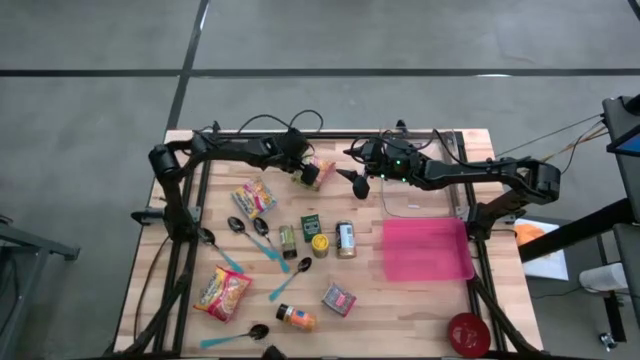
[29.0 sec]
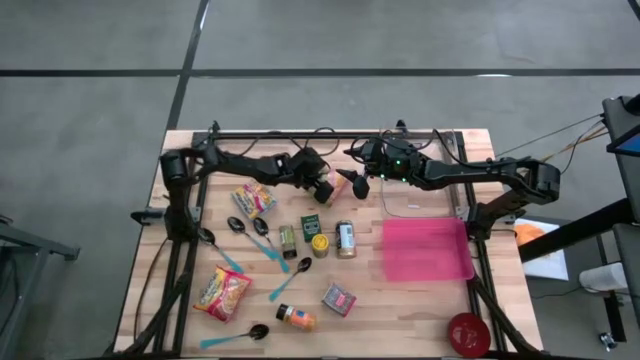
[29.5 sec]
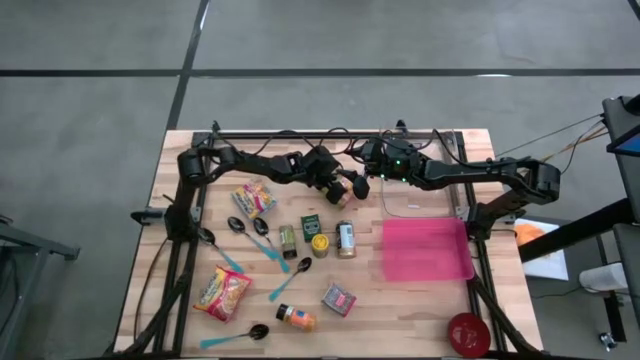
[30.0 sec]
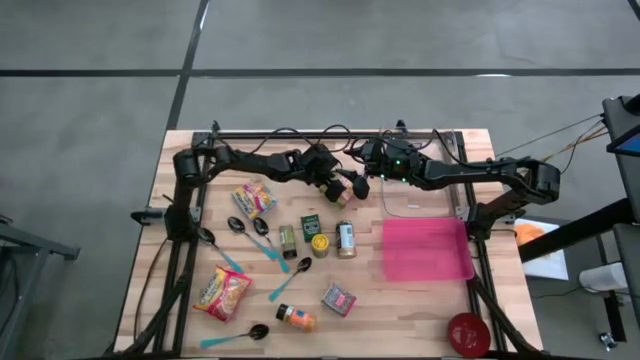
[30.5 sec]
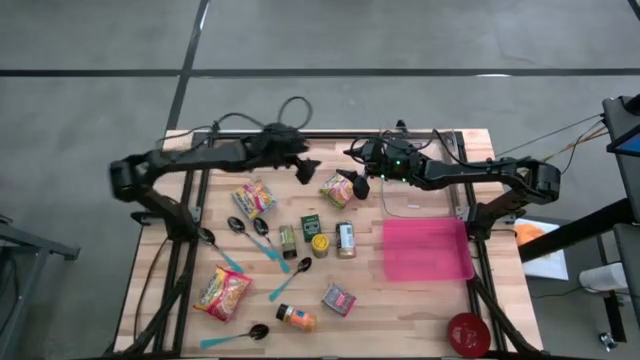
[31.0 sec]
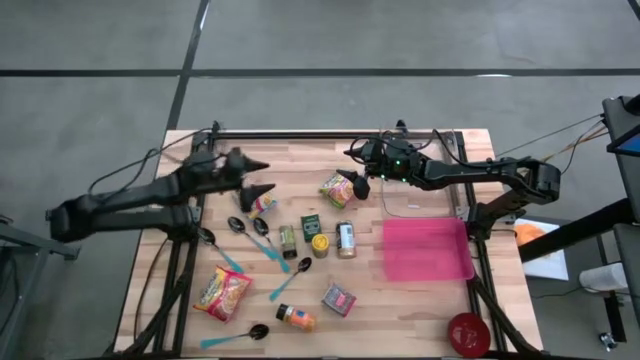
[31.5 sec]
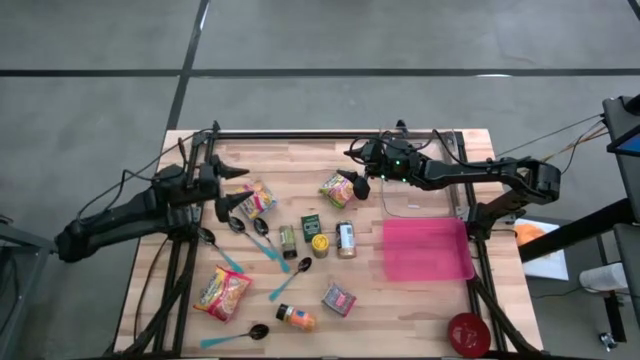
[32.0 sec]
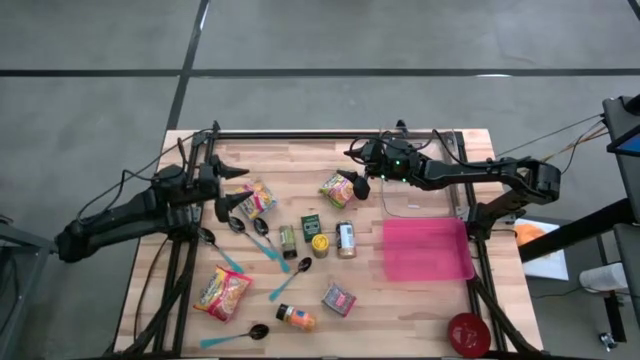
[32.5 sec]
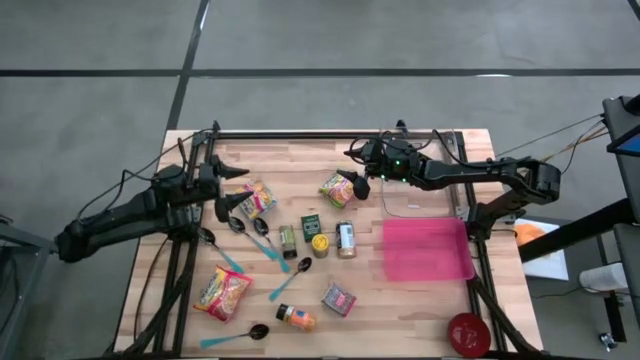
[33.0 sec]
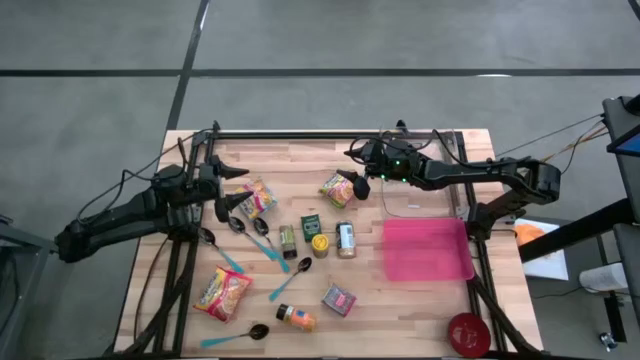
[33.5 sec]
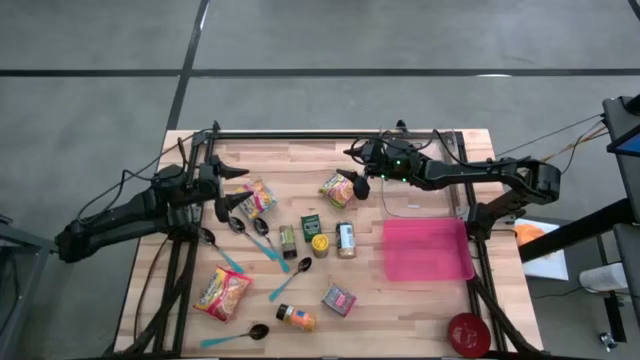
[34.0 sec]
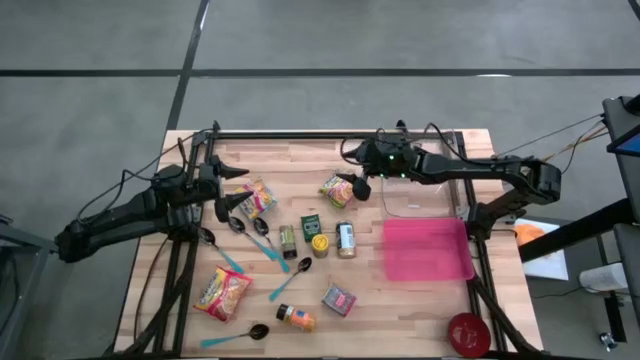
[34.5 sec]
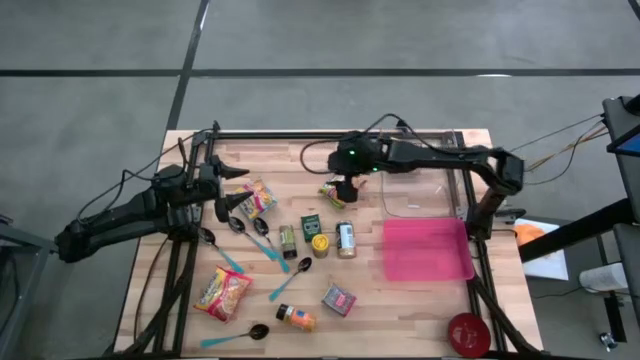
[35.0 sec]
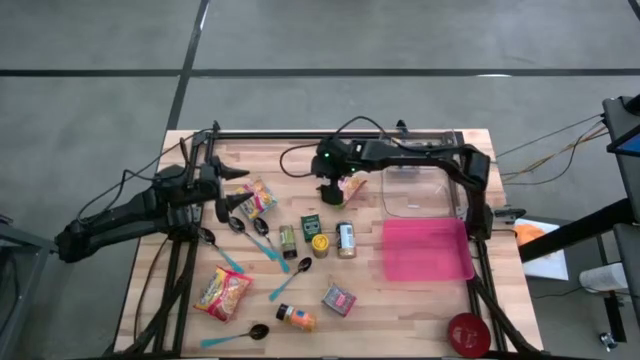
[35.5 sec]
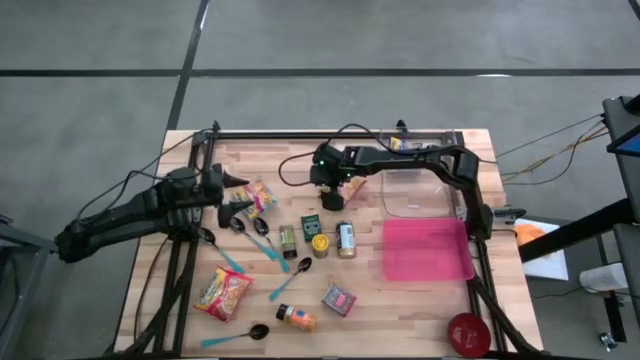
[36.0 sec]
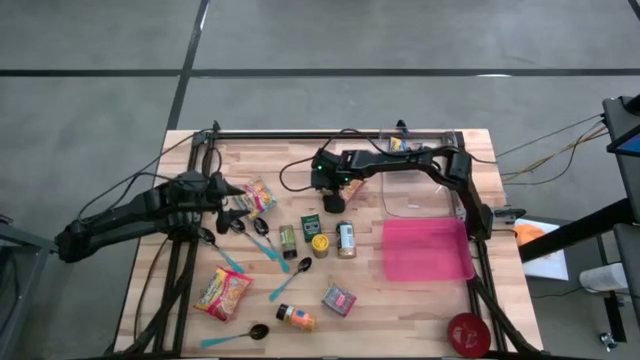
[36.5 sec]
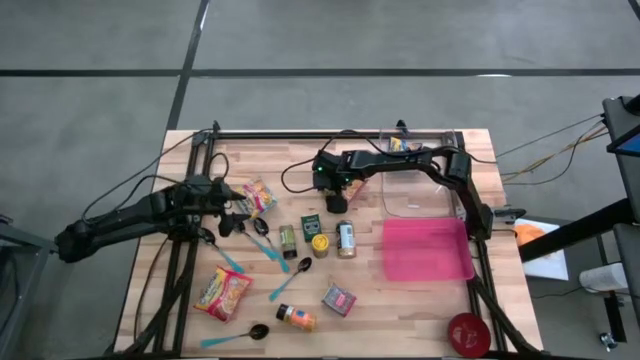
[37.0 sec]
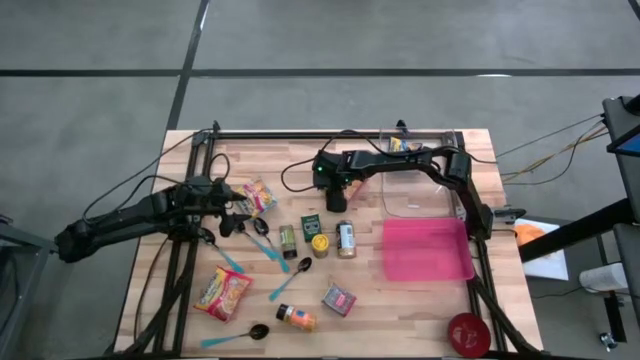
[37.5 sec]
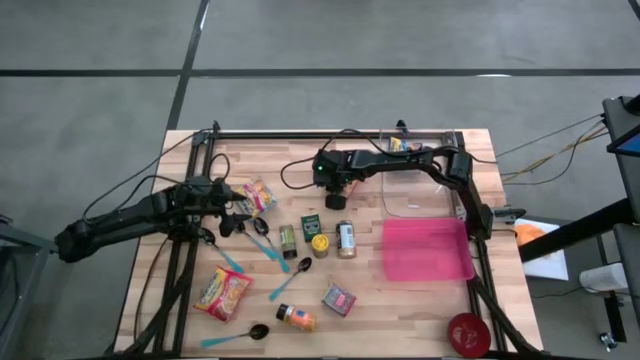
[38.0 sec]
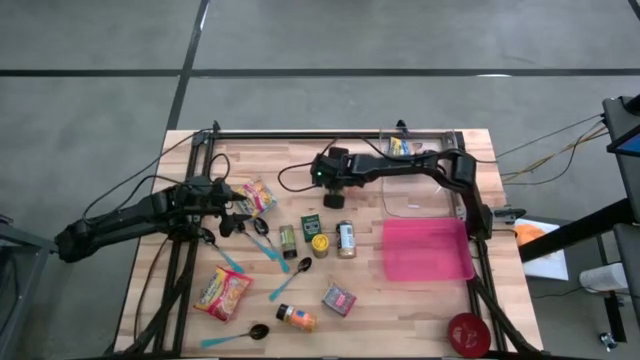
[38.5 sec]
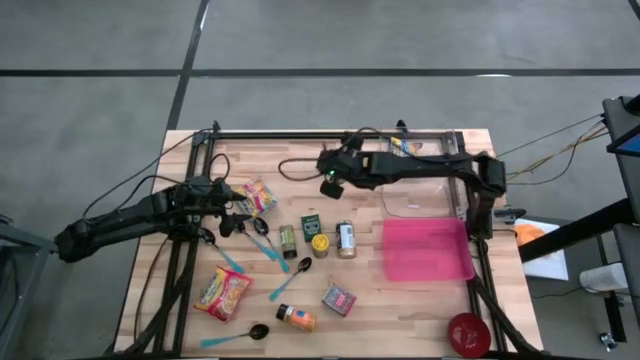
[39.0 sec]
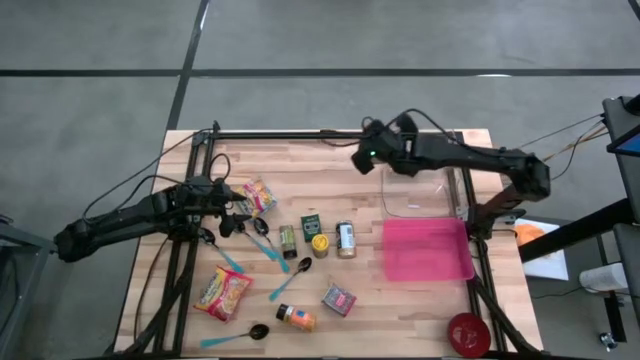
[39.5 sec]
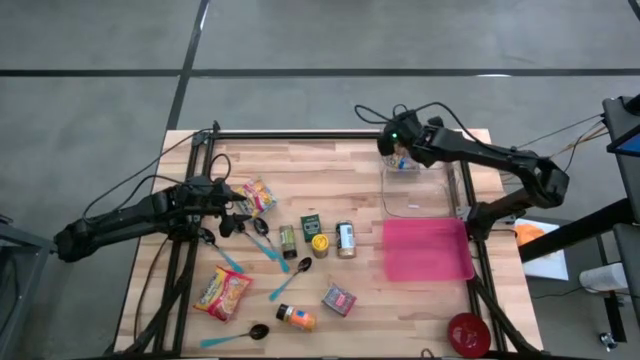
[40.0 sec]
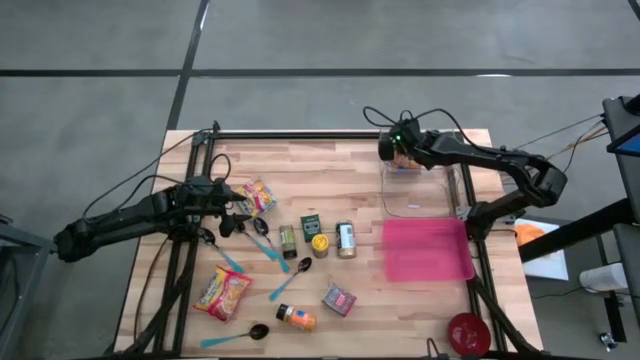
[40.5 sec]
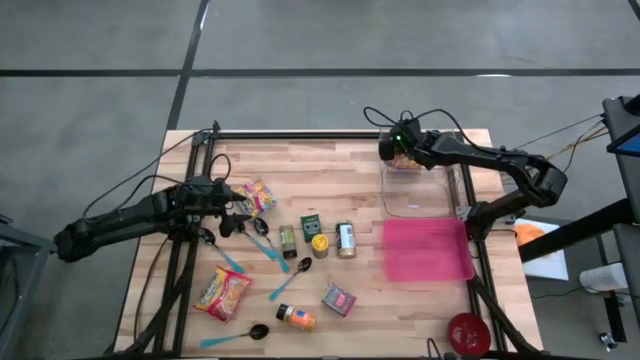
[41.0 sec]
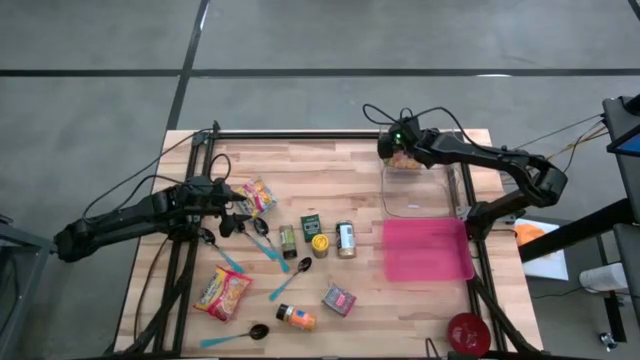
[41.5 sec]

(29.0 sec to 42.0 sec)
Put the green noodle pack into the top transparent bin
